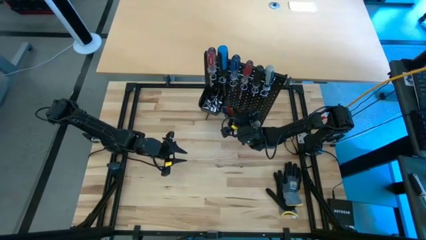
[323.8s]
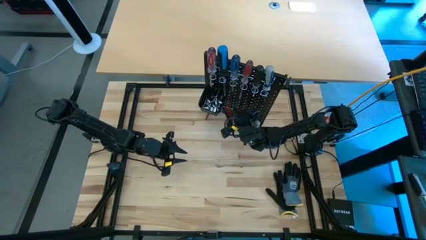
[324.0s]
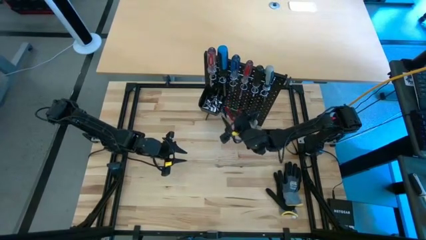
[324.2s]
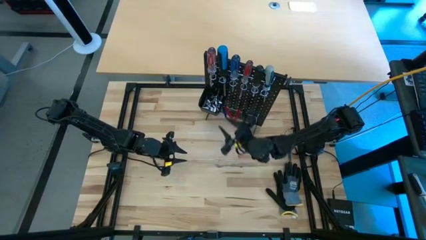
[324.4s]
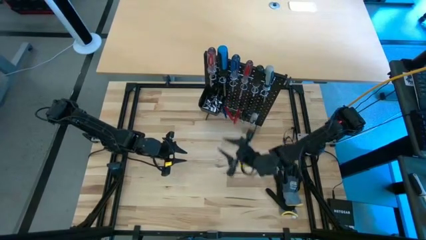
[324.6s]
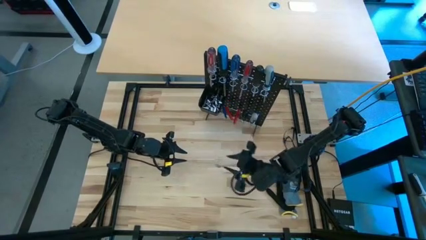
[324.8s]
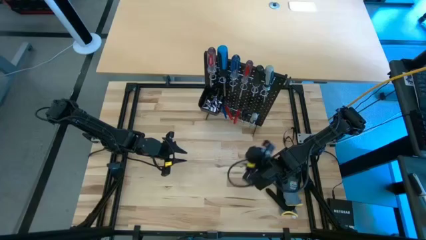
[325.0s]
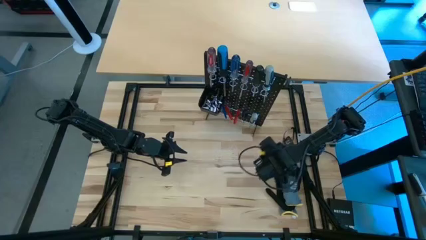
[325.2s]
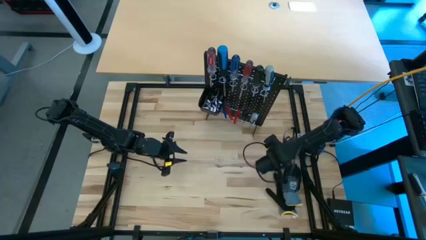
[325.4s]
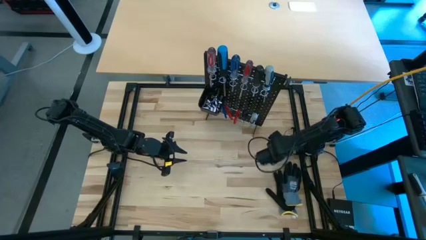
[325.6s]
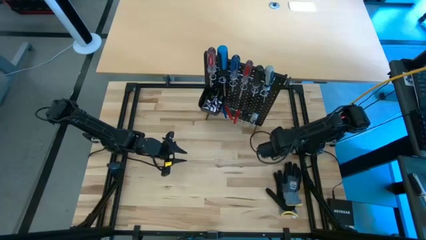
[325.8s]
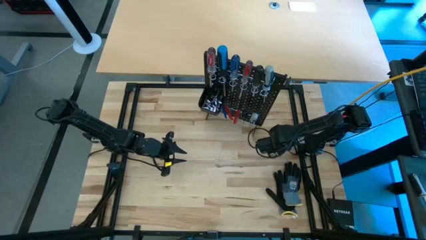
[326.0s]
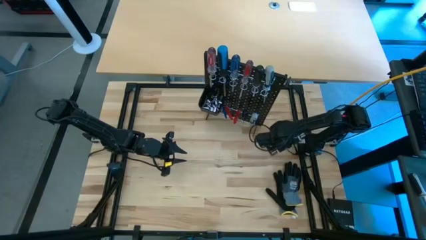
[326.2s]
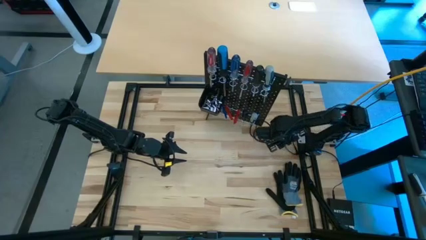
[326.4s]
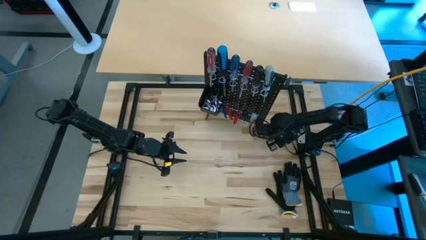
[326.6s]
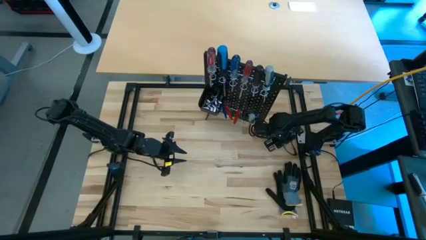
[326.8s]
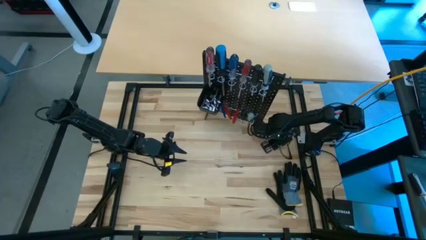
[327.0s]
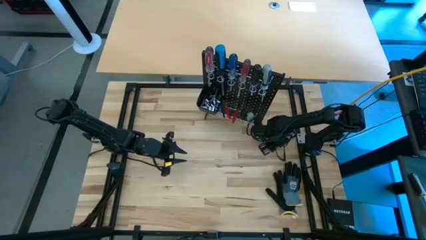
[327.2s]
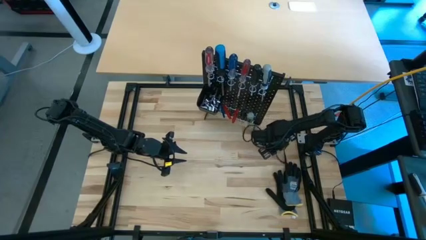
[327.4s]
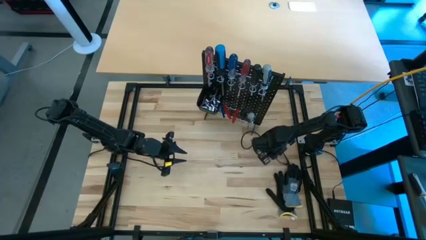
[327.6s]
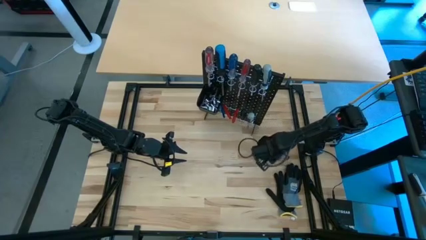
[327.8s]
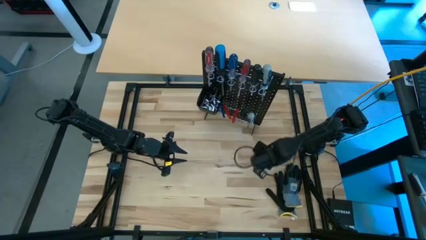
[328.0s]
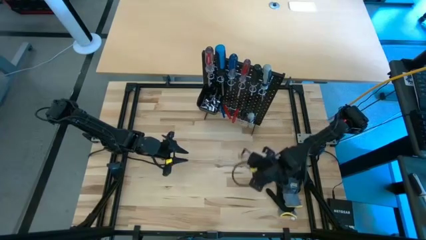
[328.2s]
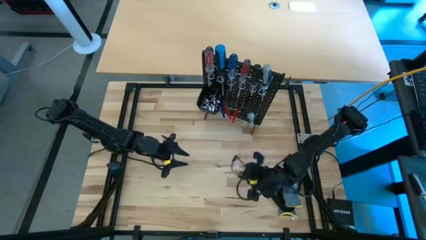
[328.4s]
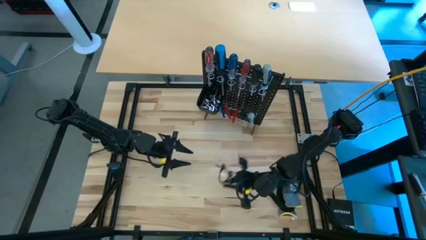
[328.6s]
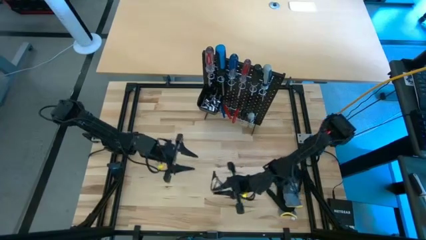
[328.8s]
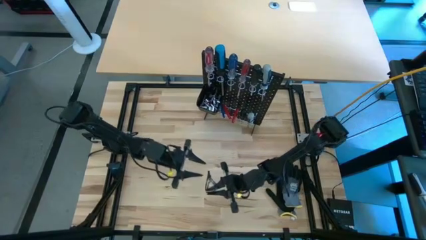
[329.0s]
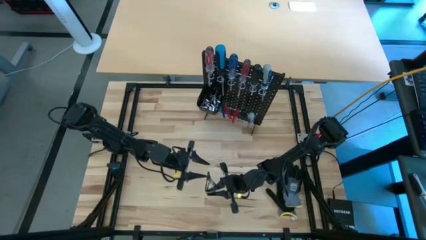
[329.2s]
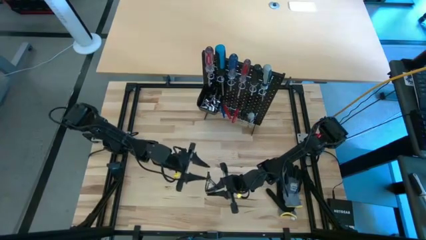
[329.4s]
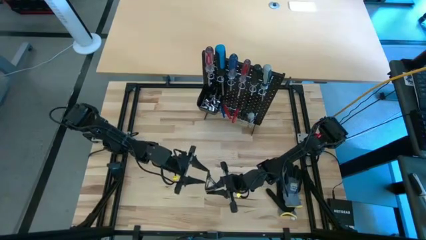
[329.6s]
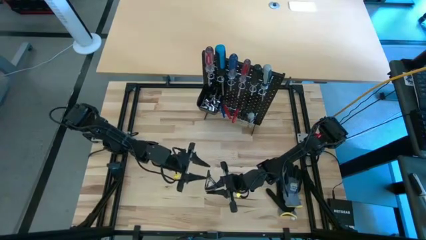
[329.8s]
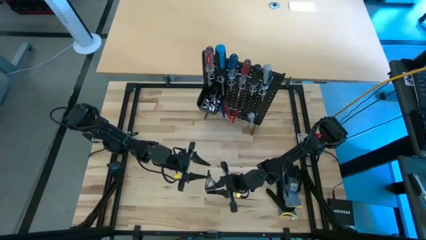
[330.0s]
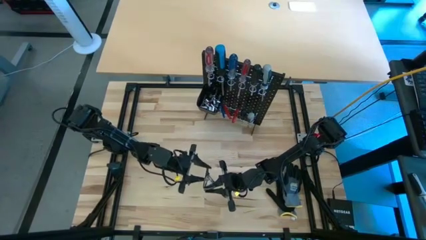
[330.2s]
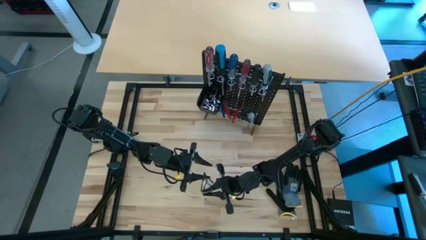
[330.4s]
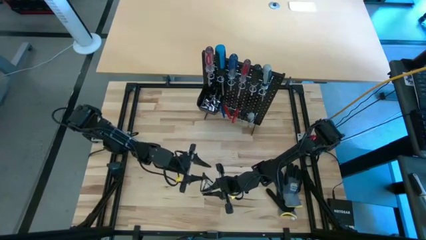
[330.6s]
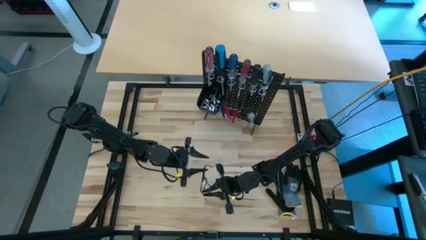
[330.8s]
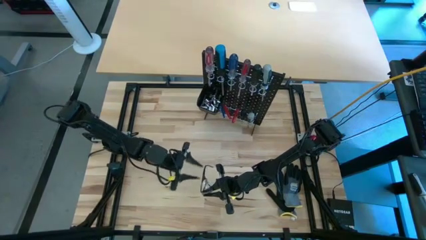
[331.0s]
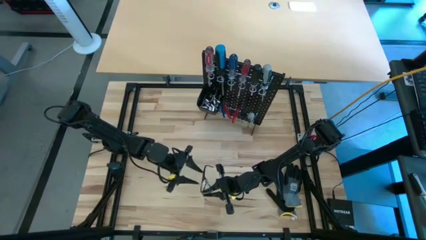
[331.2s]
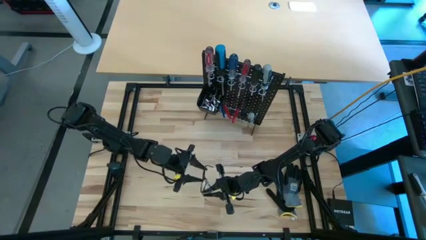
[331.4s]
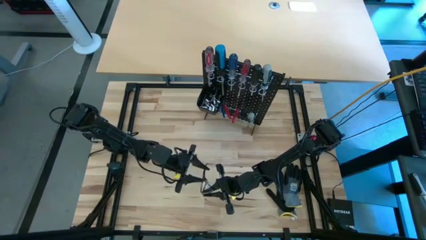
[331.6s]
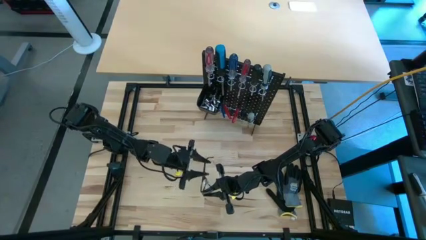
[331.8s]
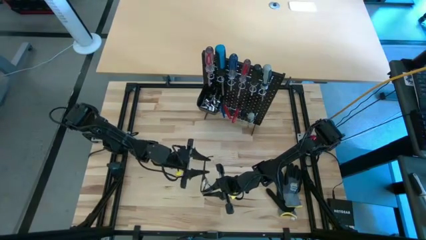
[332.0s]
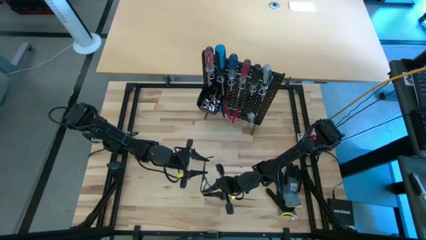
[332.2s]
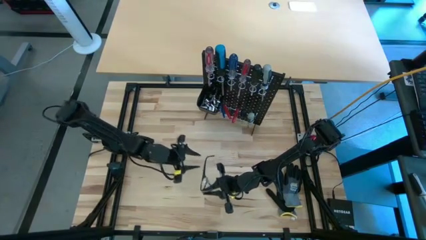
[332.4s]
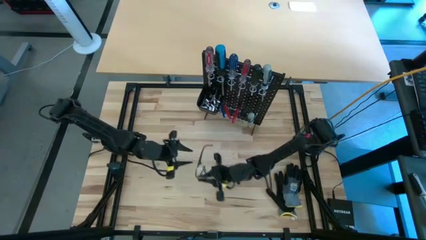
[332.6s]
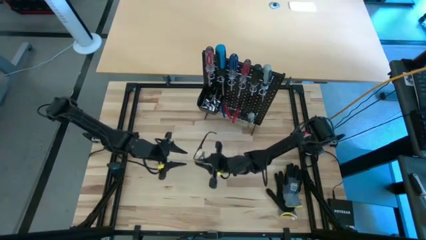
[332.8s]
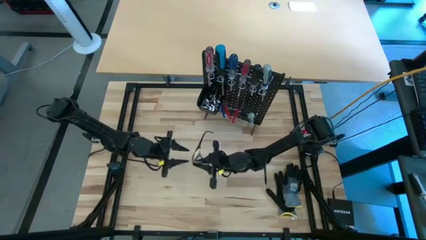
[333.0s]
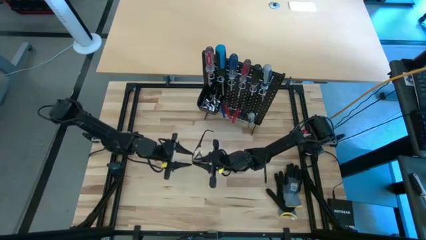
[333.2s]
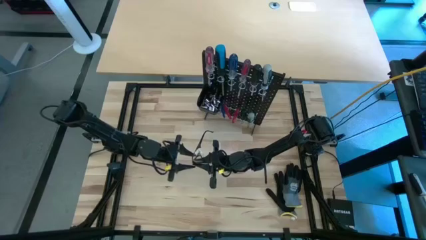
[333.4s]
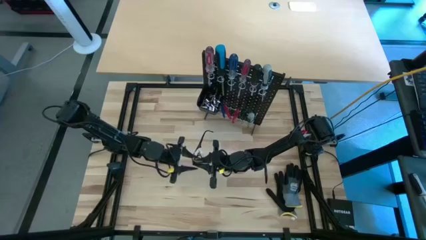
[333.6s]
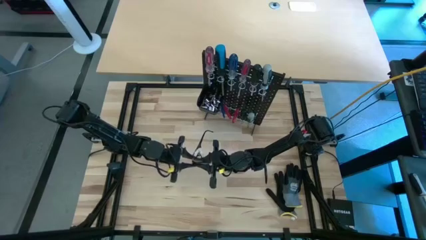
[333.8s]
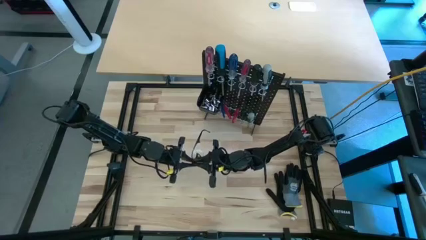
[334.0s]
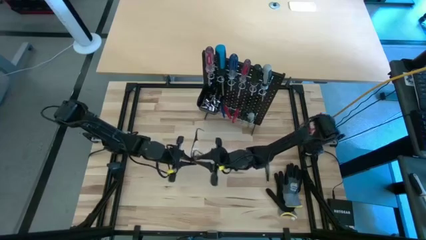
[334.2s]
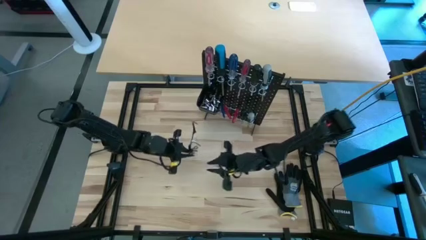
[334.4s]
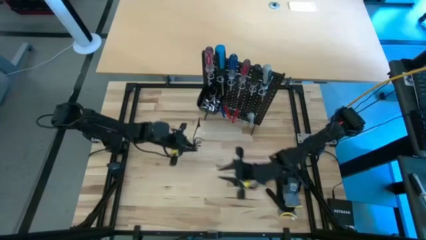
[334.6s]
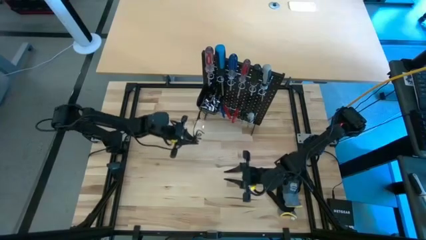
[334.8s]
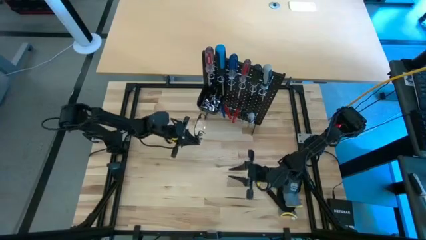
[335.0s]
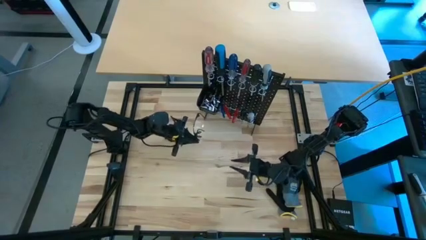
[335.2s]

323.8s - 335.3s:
Task: Hang tools onto peg board
Hang the eye glasses on the black pegboard
